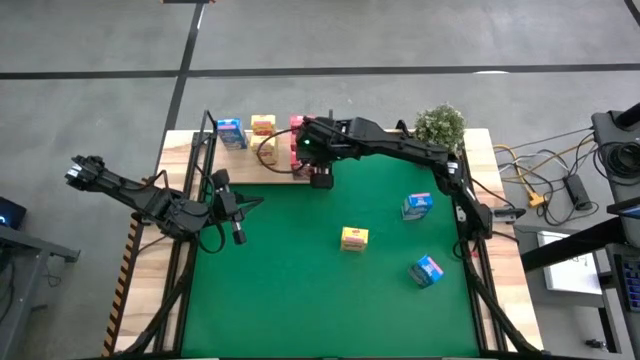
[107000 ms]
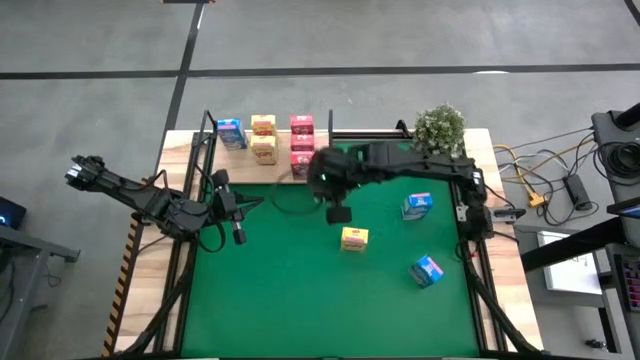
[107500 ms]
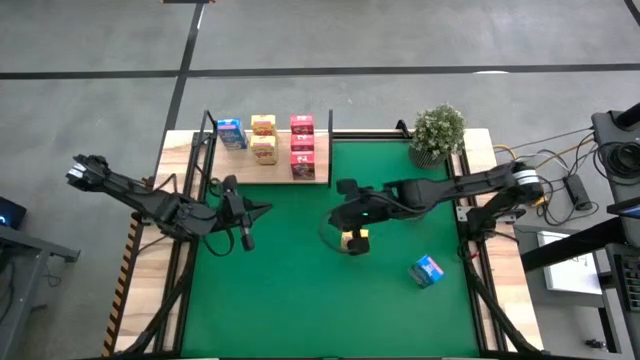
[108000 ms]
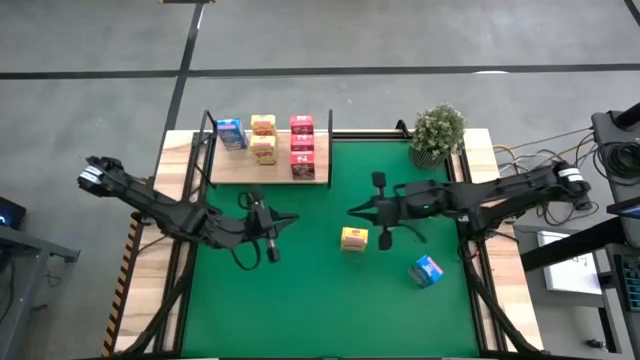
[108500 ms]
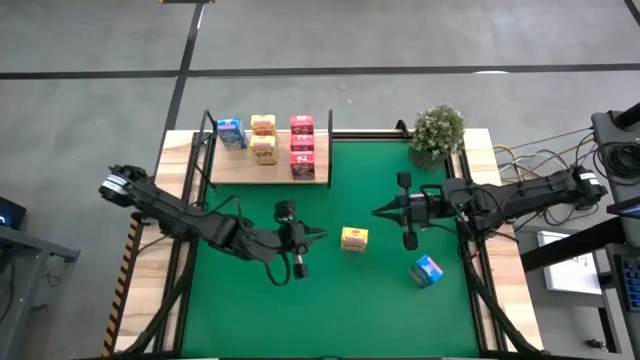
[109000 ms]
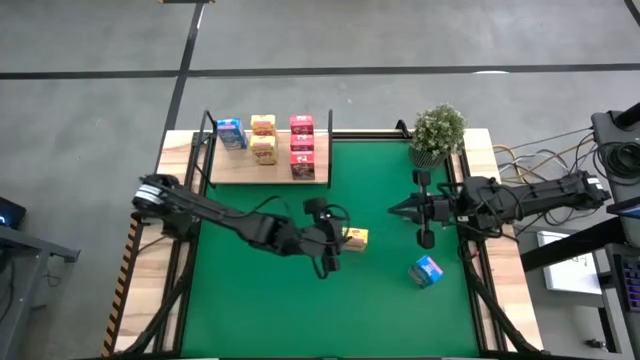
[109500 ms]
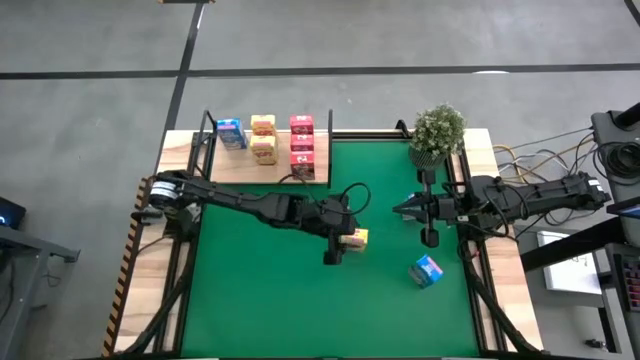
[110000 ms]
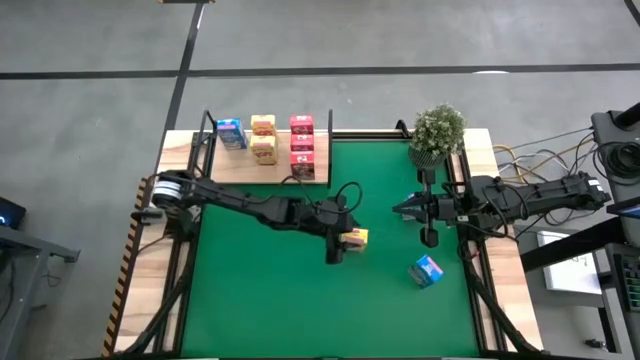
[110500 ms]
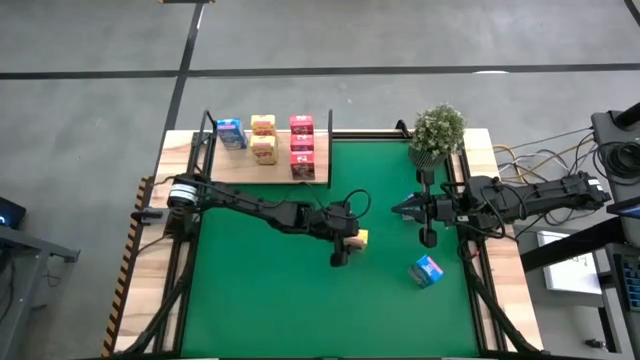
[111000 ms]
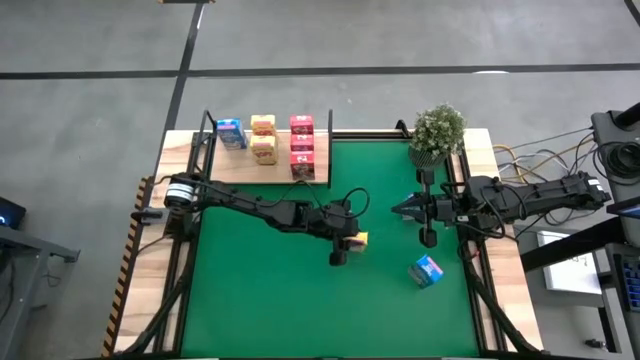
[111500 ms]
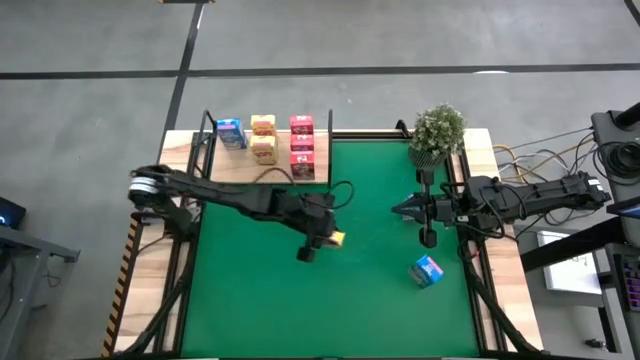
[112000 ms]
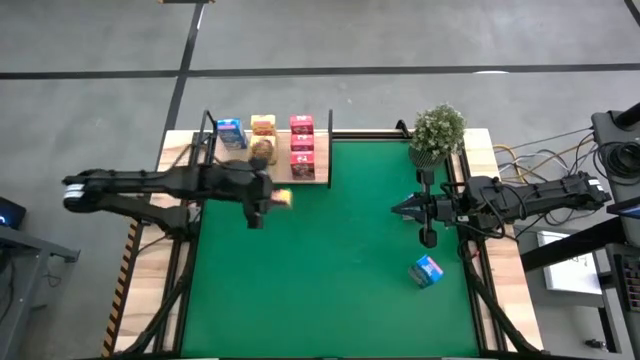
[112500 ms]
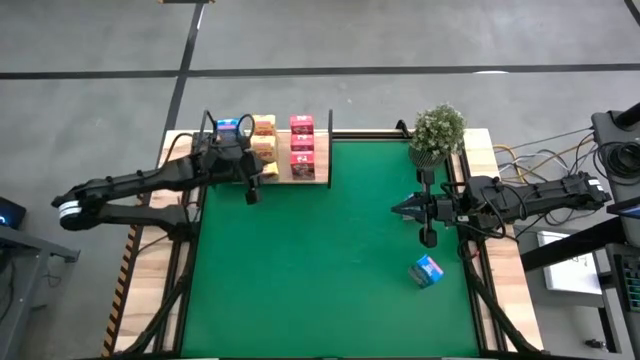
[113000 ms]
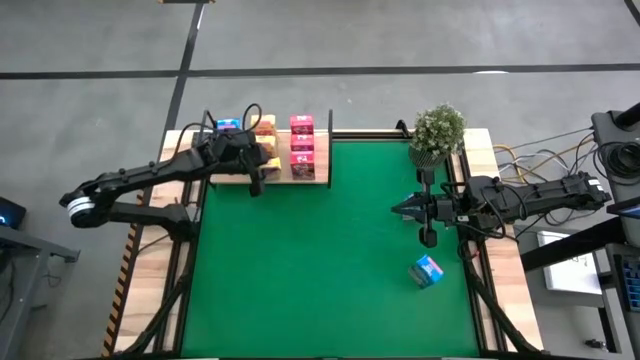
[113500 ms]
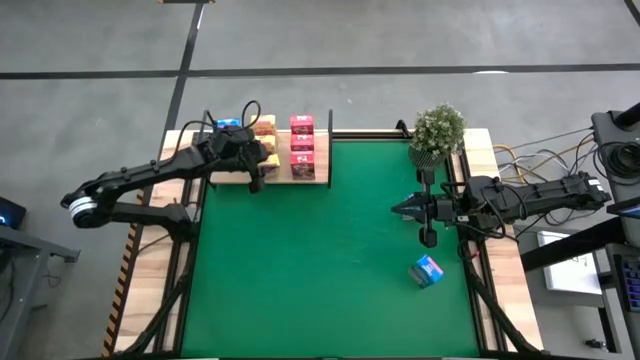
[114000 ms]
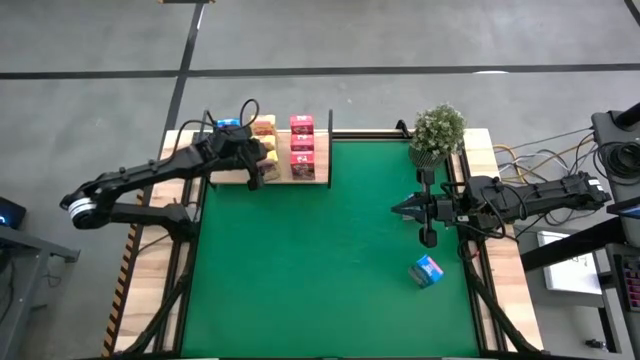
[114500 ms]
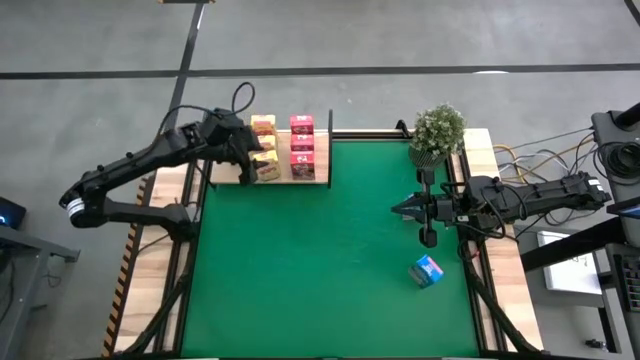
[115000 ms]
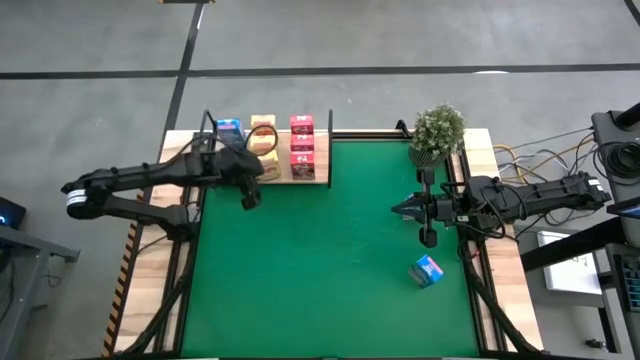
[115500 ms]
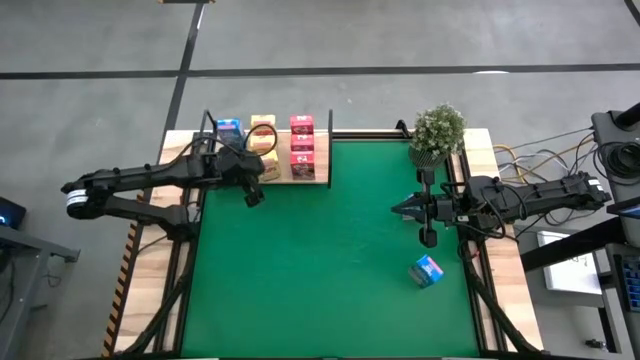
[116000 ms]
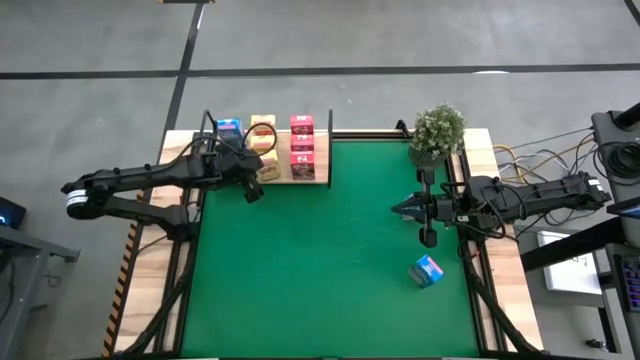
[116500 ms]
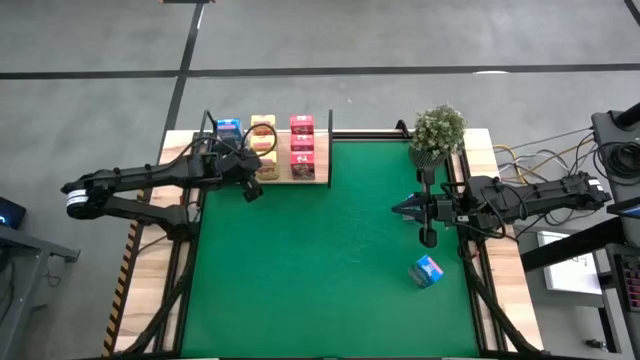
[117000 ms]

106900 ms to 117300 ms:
Task: Stack cereal on shelf
Put the yellow cereal box aligned with the yellow cereal box on the shelf

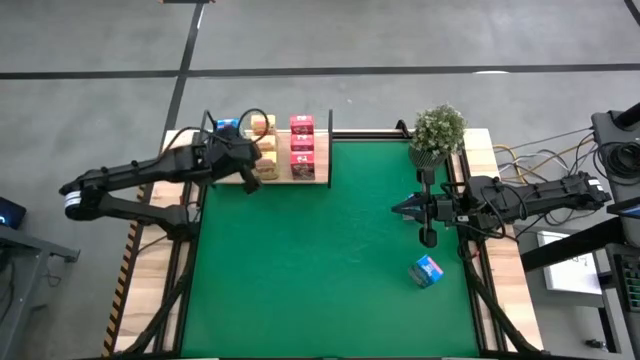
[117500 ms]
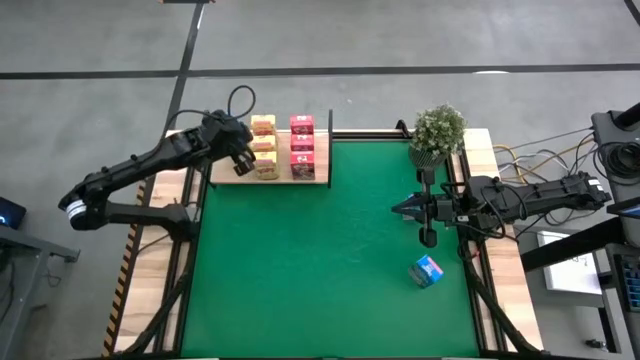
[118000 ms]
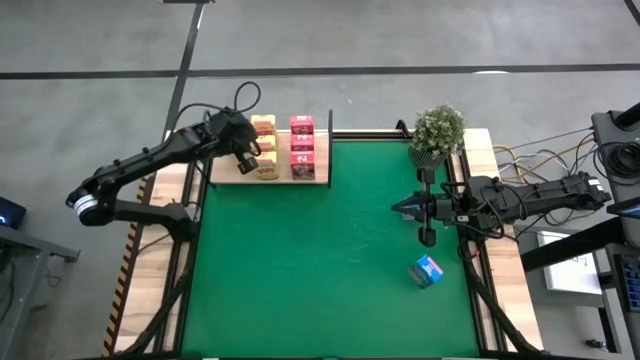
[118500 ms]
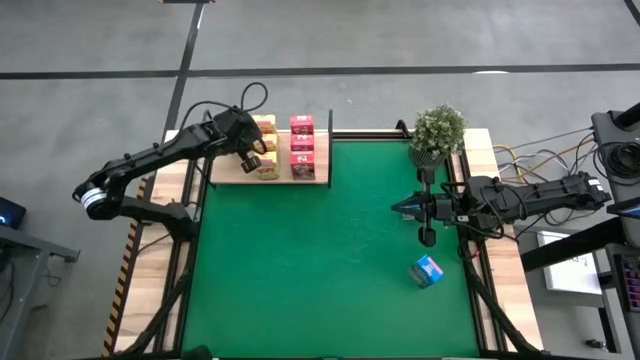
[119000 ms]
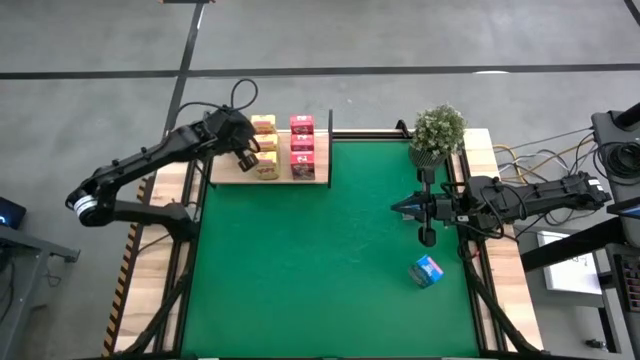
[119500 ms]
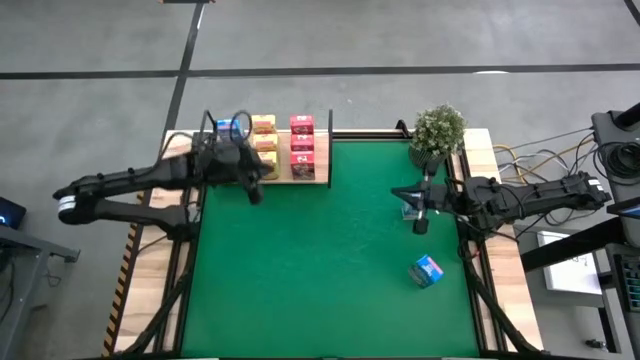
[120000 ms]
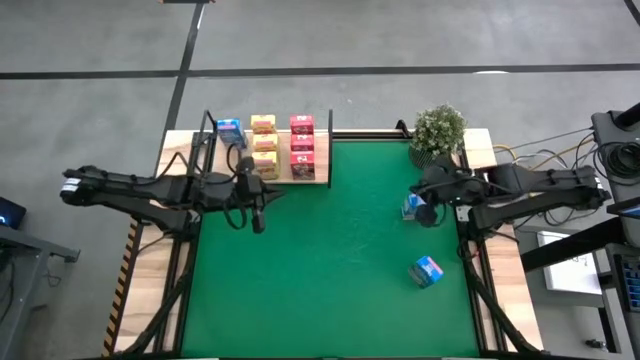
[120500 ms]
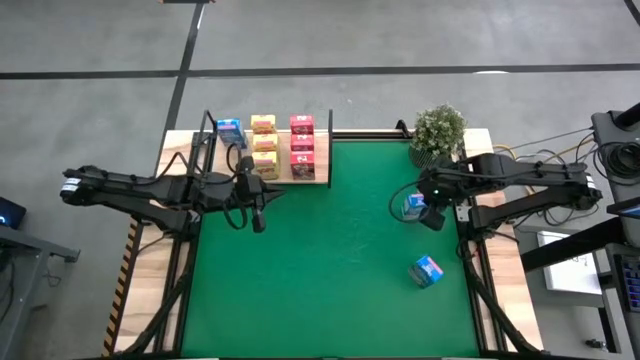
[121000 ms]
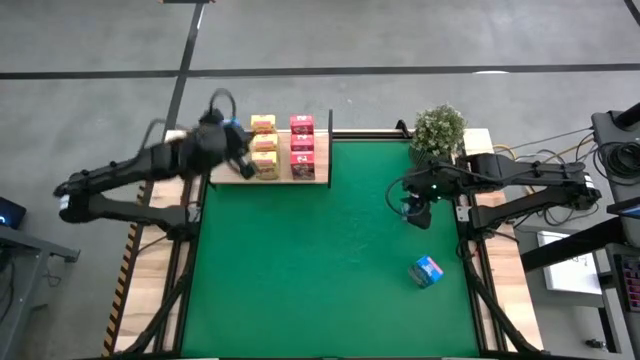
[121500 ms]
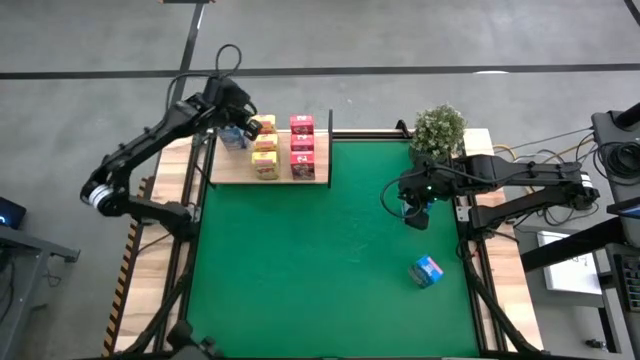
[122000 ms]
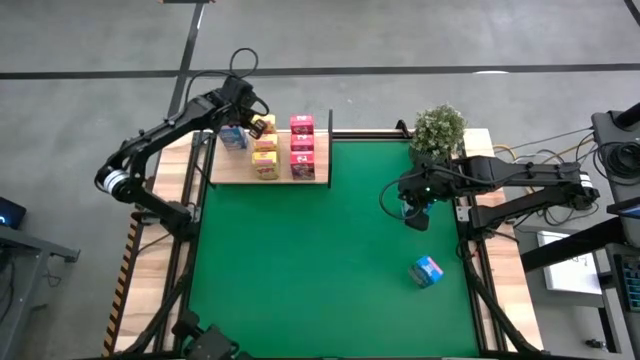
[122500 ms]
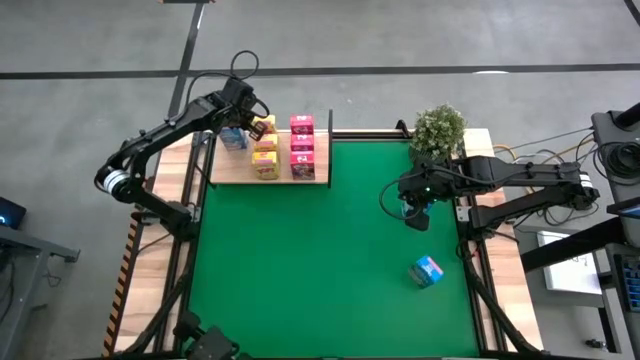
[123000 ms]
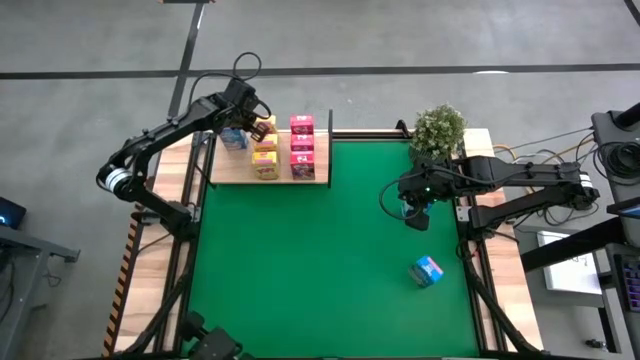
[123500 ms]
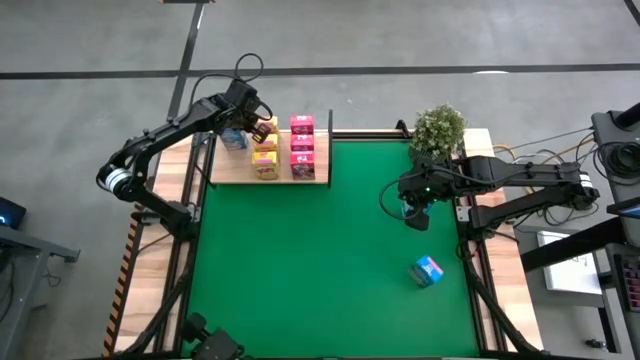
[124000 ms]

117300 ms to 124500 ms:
Adjust the yellow cereal boxes on the shelf

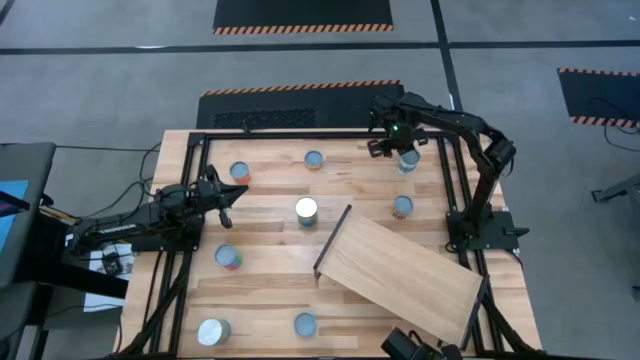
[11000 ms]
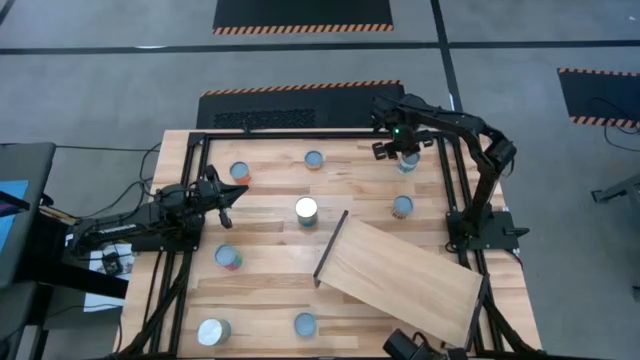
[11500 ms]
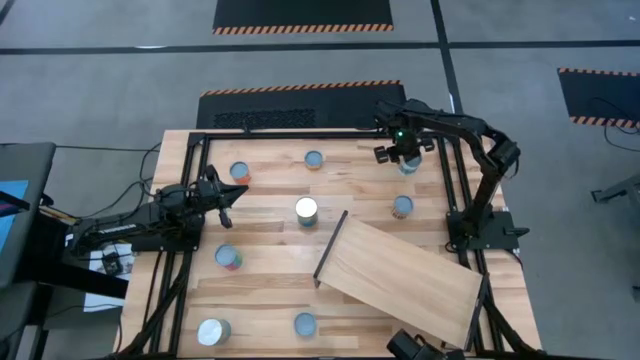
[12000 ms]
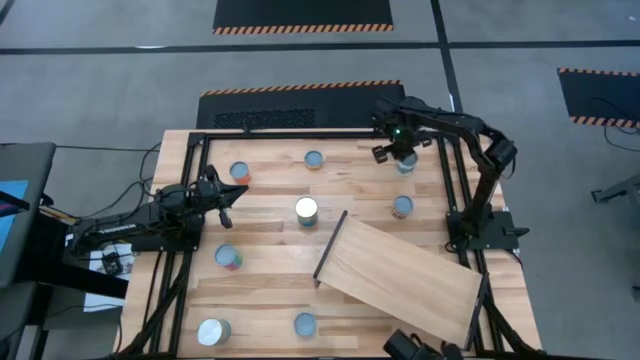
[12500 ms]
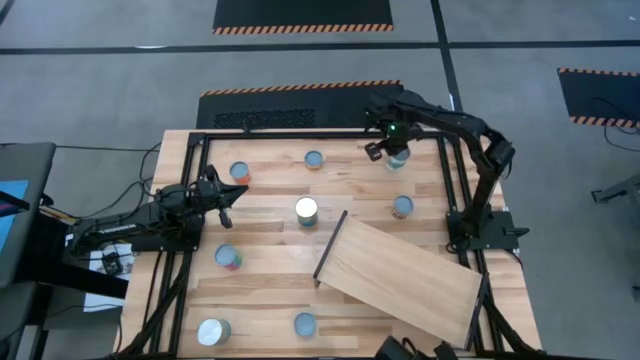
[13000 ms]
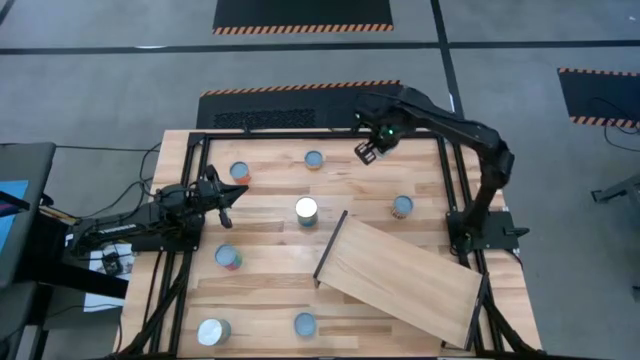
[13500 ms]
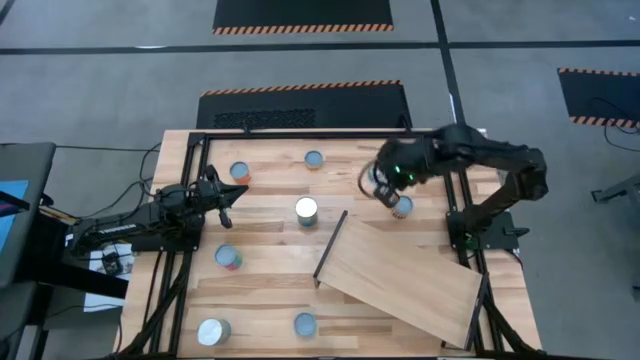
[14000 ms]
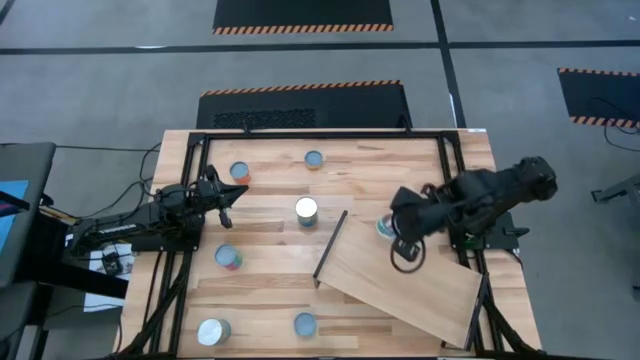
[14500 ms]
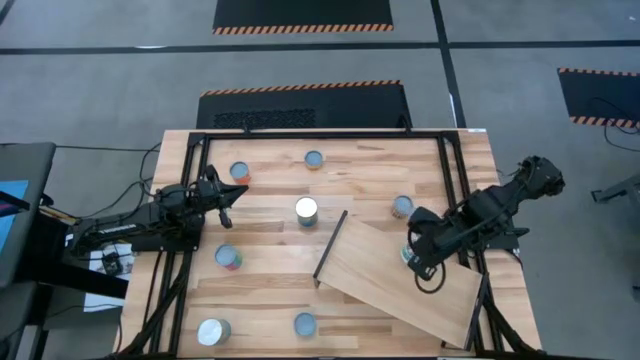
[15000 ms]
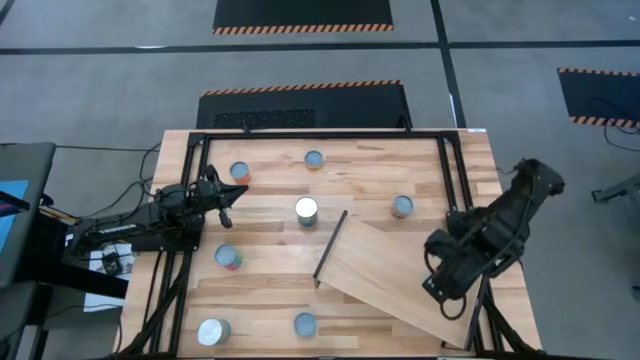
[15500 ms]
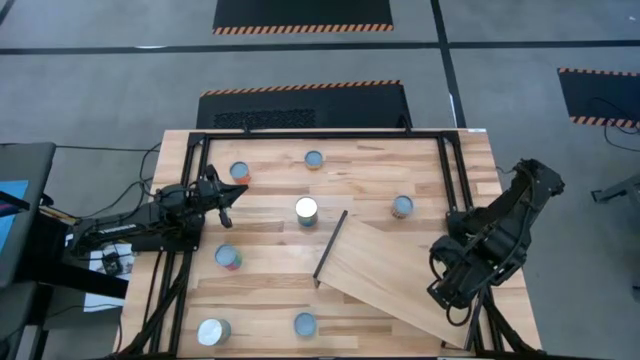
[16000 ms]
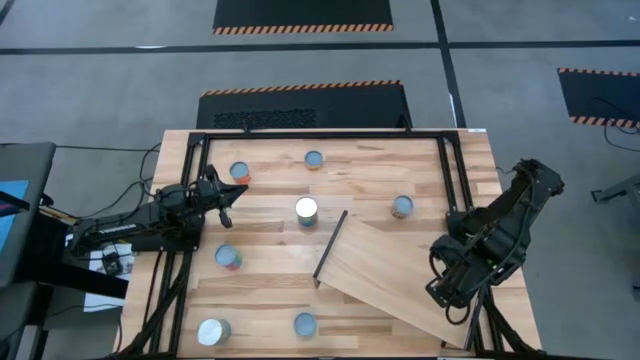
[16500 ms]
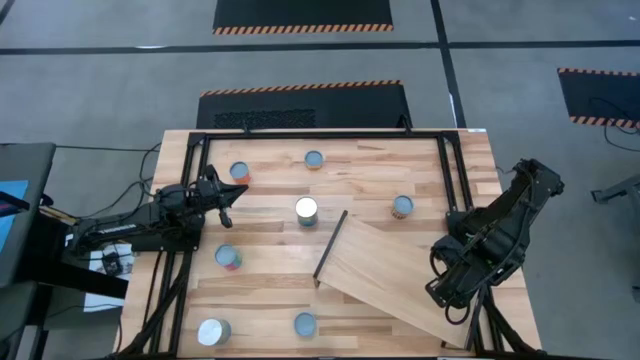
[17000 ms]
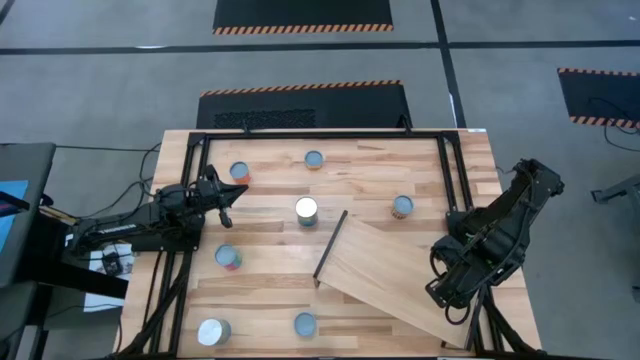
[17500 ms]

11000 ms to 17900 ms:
Task: Pick and place cans onto a shelf
Put the canned mixed vegetables on the shelf
